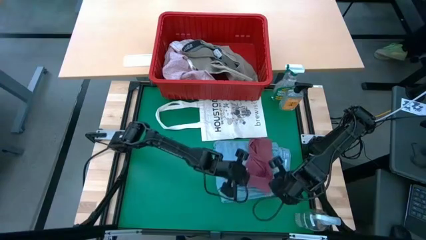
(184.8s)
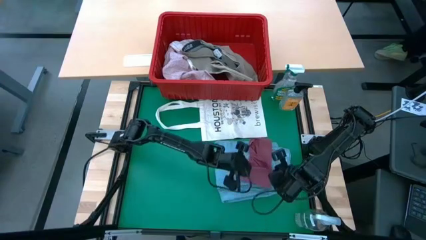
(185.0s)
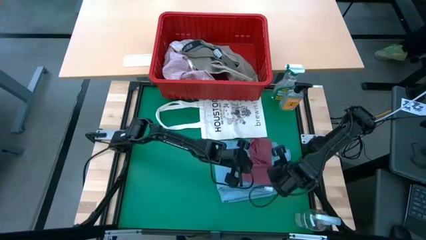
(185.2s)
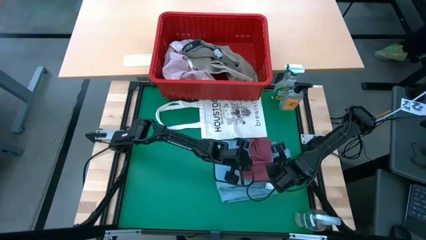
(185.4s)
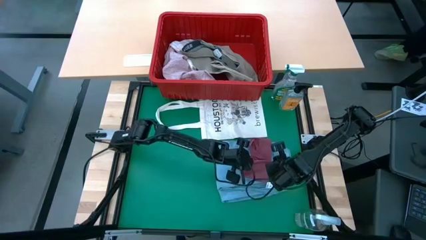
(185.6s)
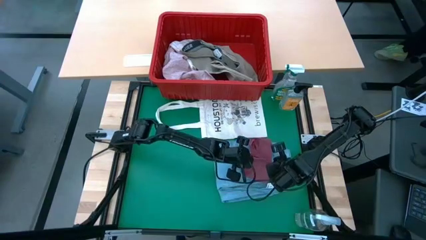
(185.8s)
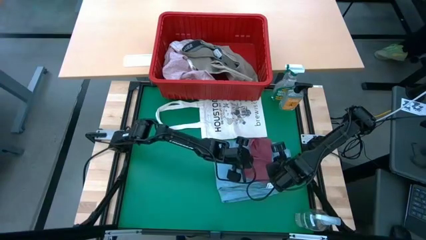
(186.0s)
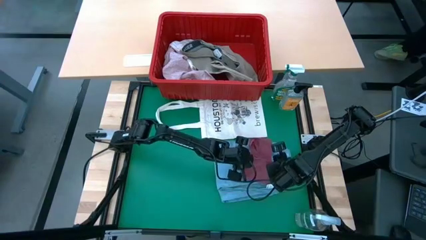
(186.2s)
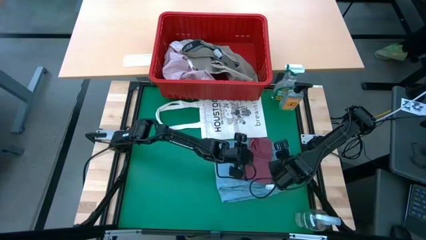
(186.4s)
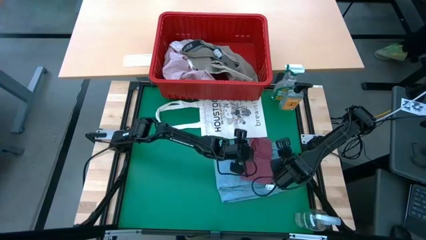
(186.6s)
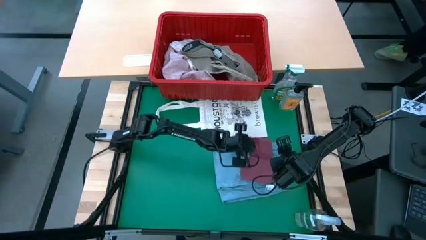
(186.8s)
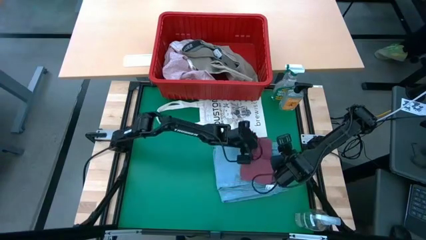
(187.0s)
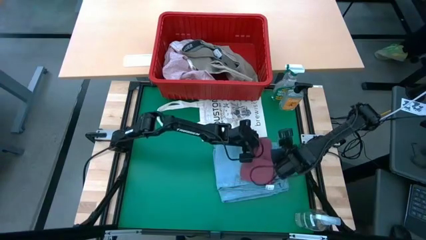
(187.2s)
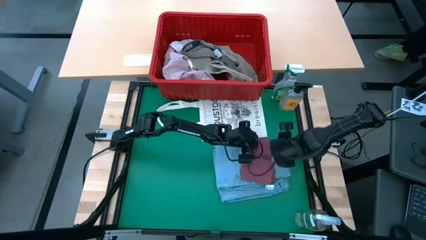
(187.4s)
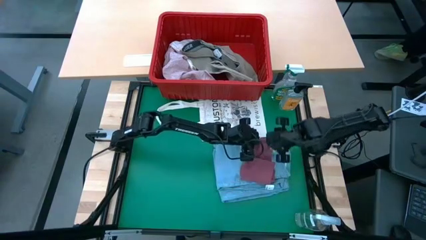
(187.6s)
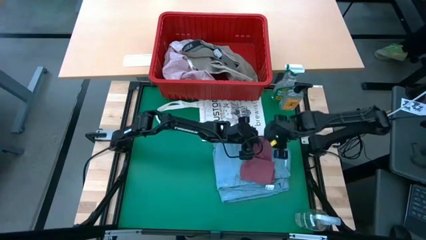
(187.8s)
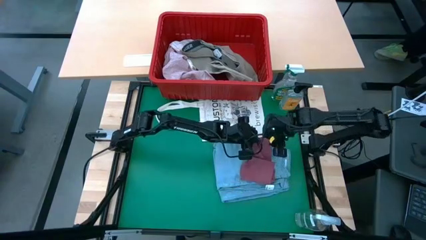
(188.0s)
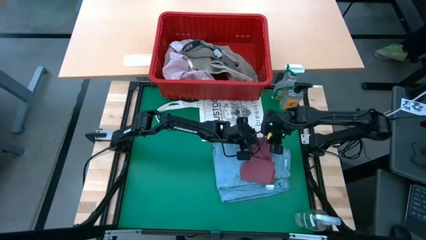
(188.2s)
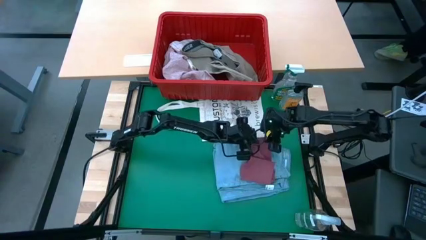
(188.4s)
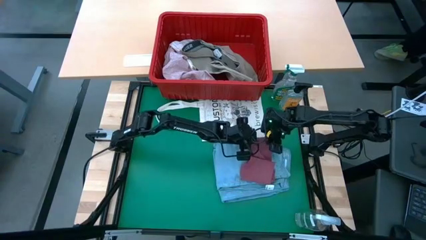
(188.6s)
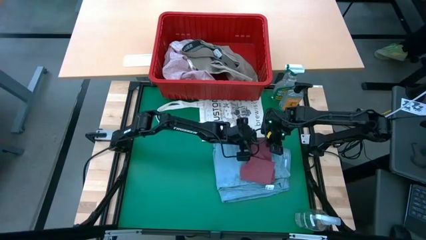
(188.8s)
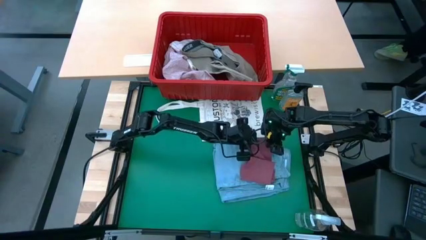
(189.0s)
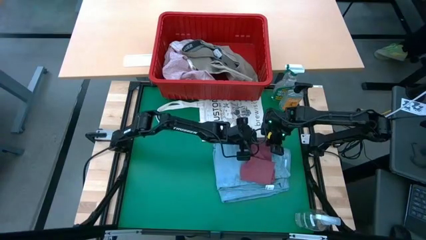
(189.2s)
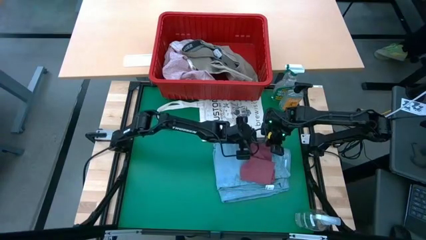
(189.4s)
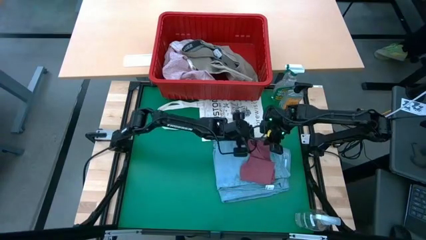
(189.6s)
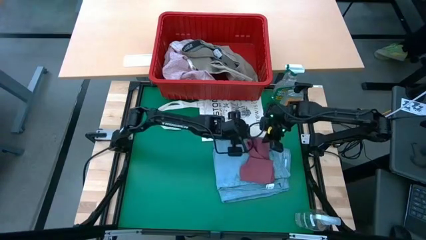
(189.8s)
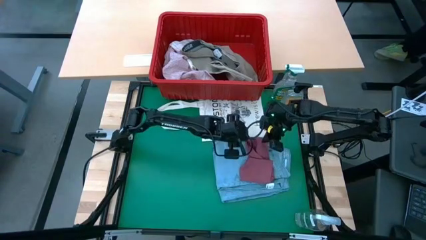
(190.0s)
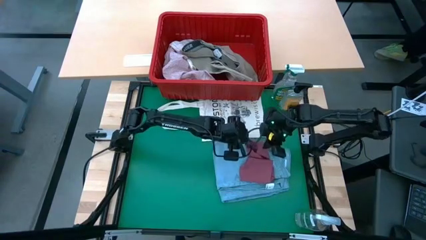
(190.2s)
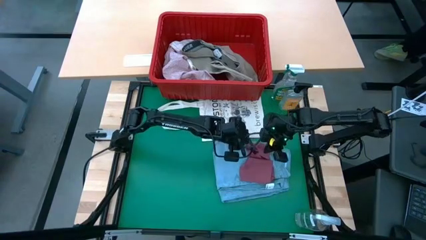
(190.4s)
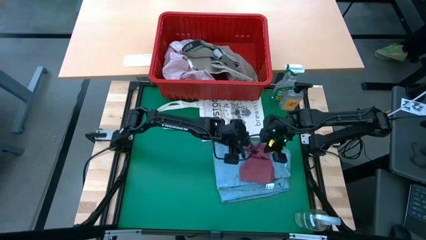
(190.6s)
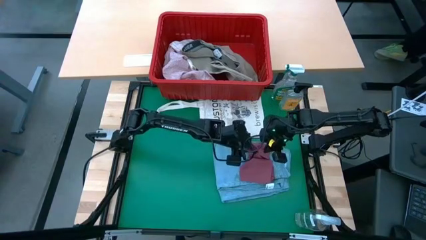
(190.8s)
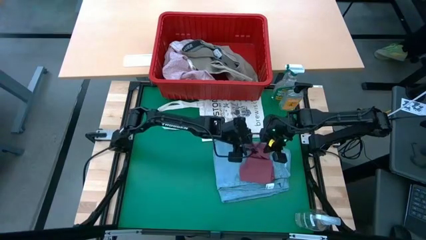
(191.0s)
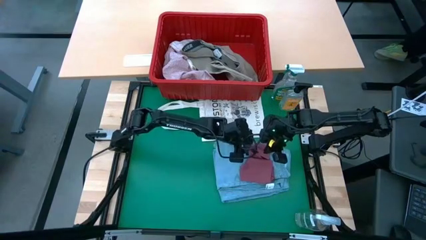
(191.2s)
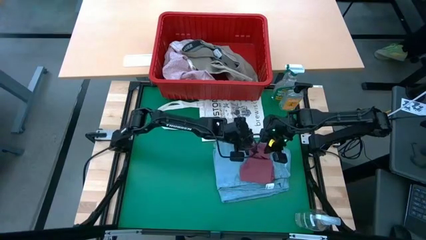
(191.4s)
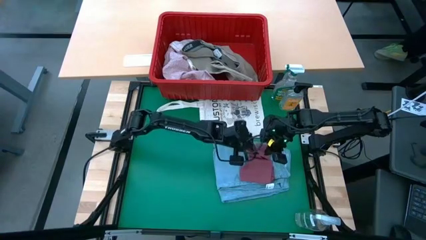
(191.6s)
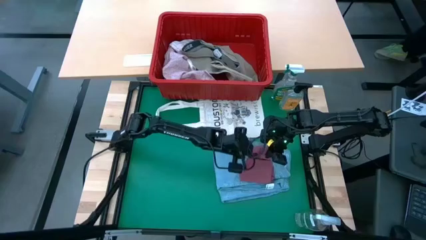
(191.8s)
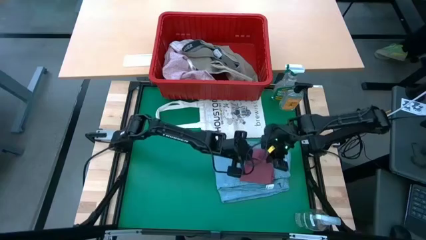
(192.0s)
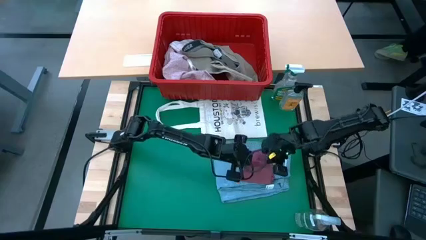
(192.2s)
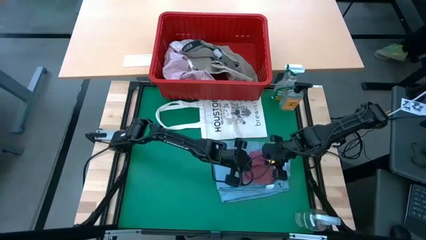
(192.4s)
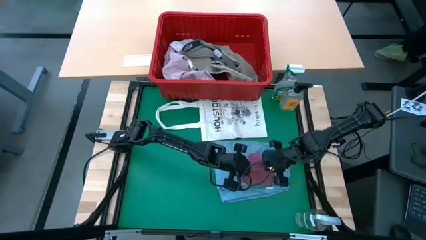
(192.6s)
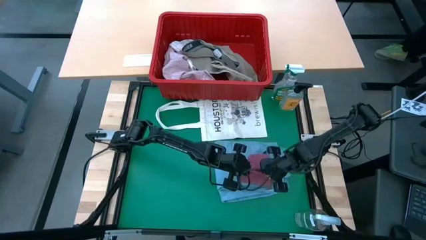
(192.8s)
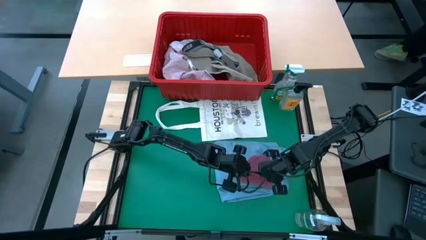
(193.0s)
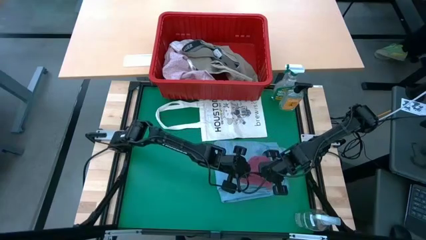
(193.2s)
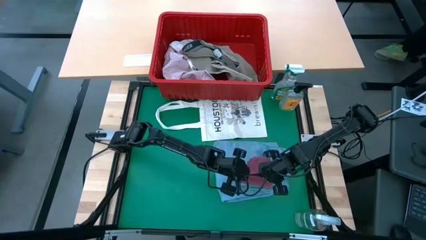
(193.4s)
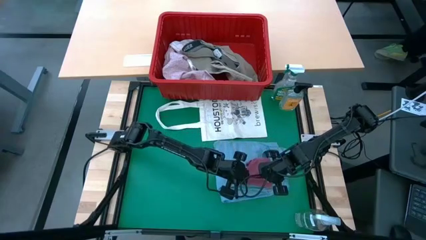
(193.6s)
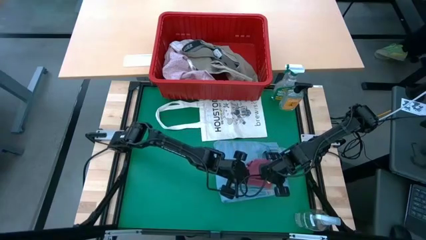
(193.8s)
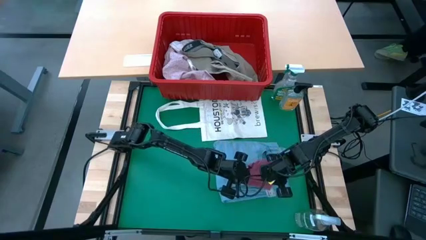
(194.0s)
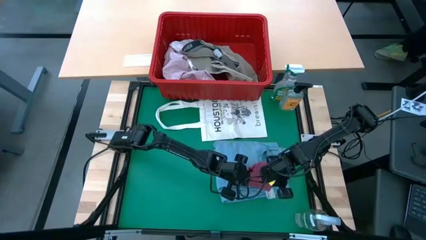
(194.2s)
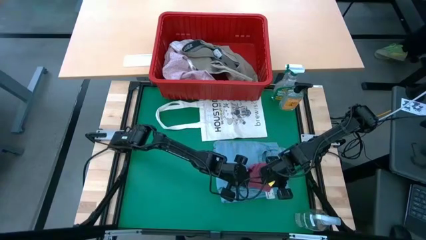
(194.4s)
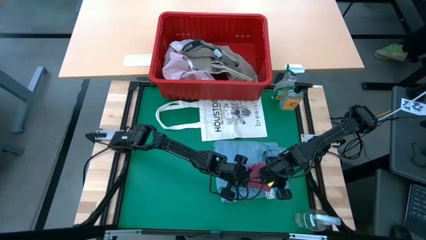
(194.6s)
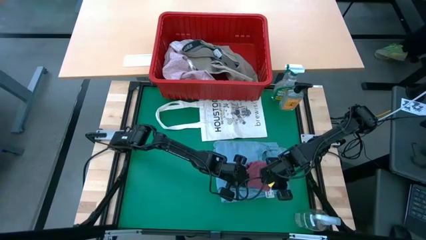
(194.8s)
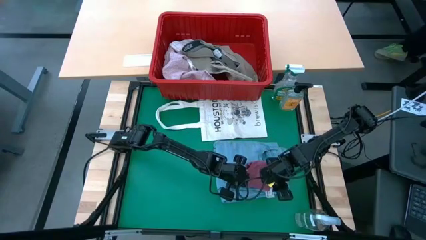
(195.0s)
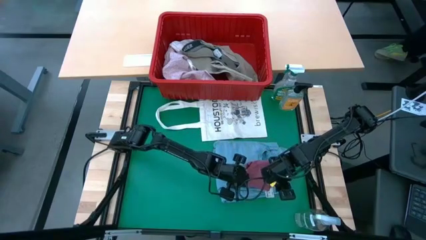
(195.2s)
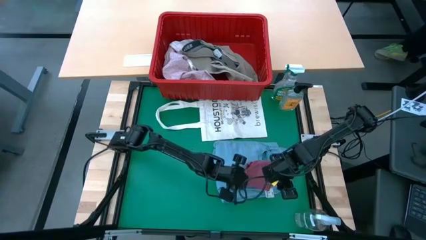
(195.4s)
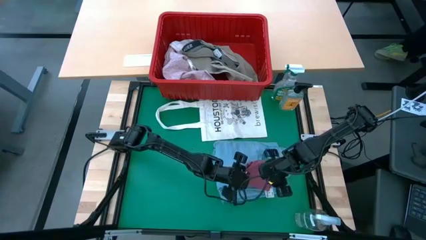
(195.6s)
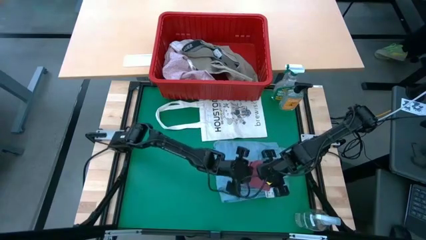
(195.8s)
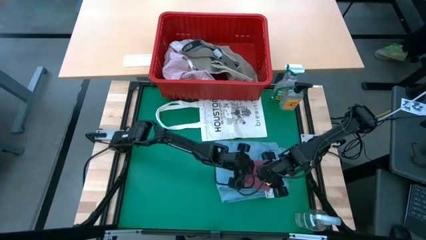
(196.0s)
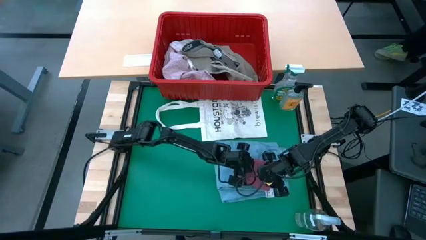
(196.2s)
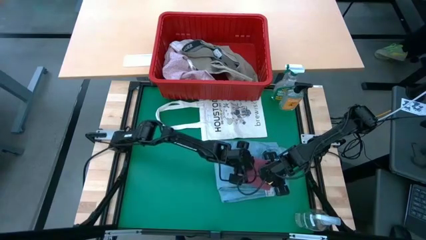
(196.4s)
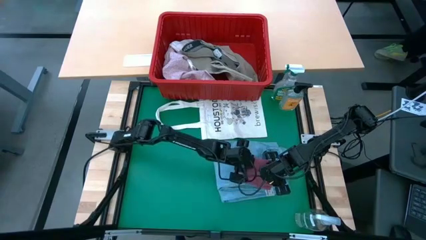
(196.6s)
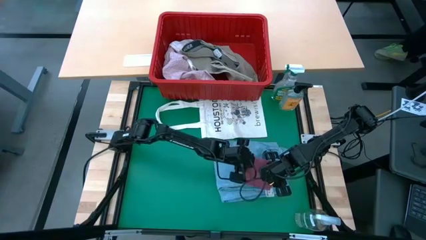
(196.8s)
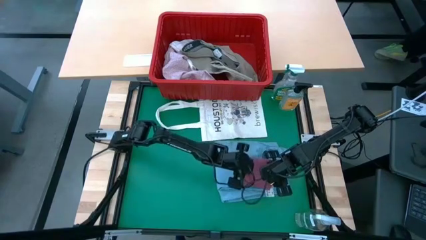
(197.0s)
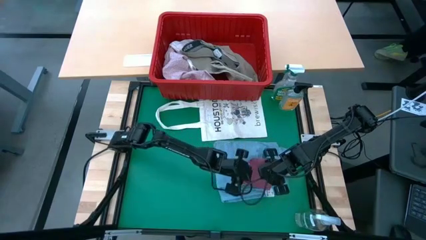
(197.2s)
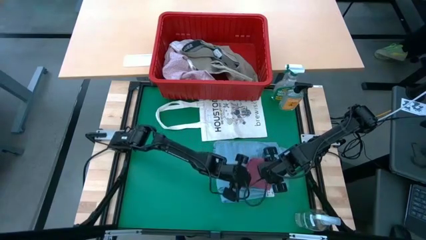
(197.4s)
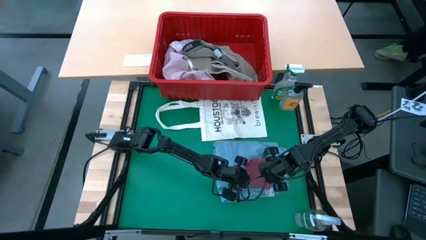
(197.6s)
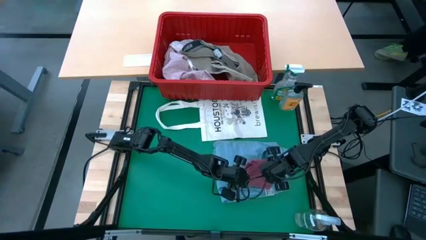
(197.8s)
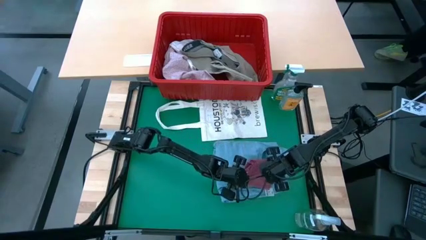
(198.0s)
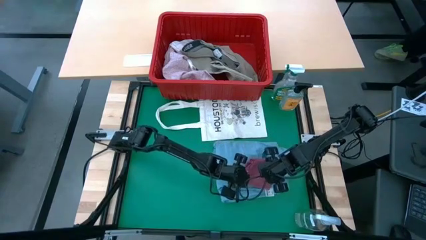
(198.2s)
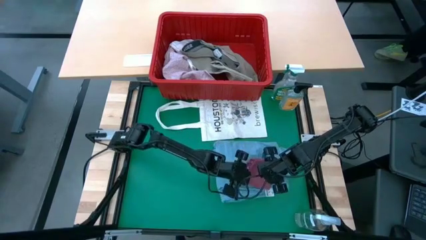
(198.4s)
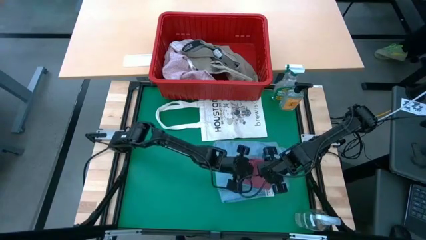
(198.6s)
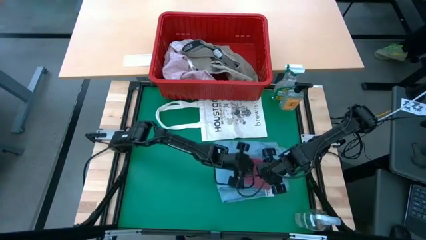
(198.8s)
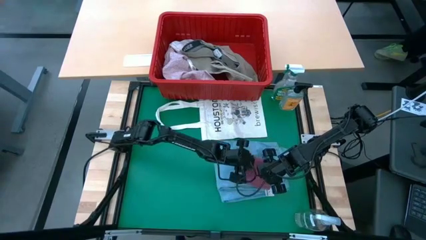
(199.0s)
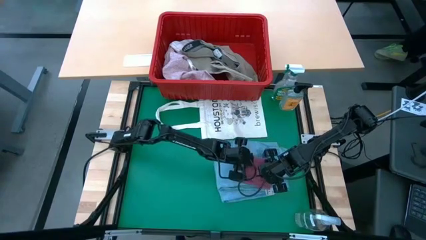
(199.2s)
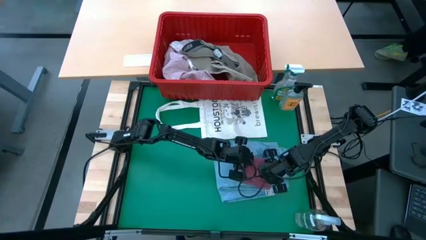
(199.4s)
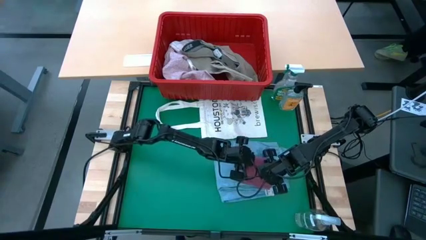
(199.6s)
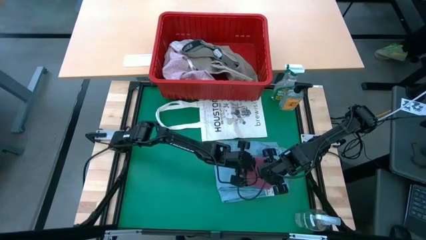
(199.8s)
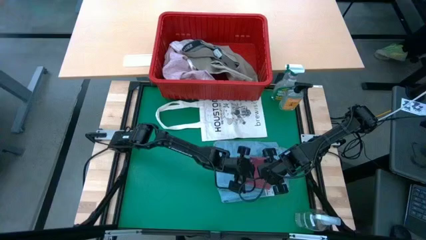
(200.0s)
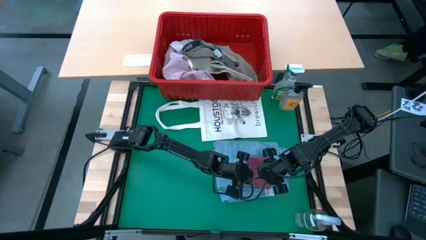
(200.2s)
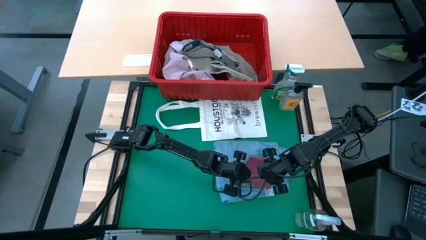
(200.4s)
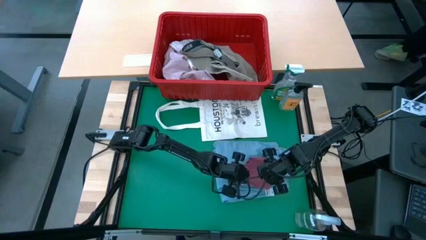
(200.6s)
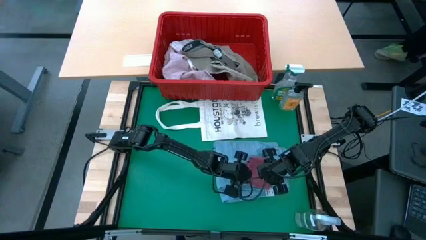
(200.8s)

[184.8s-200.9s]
Task: Fold Laundry from Bin
Fold the red underwear from the red laundry basket
